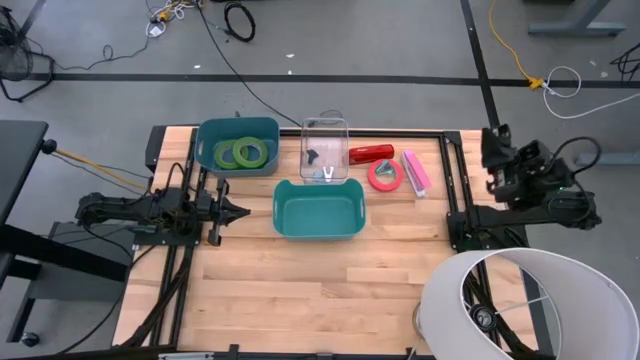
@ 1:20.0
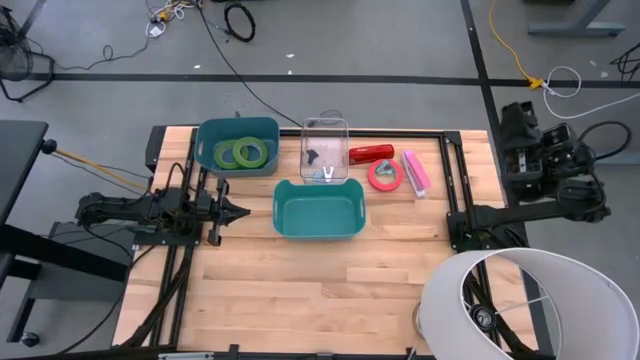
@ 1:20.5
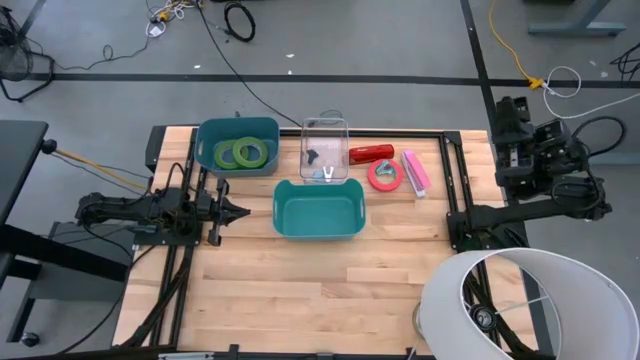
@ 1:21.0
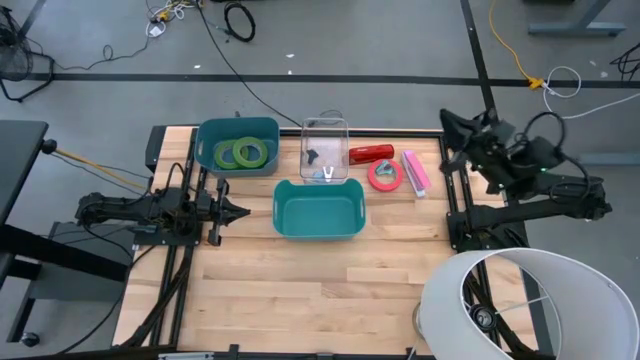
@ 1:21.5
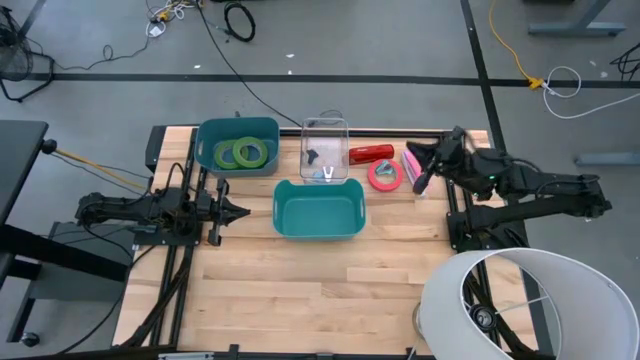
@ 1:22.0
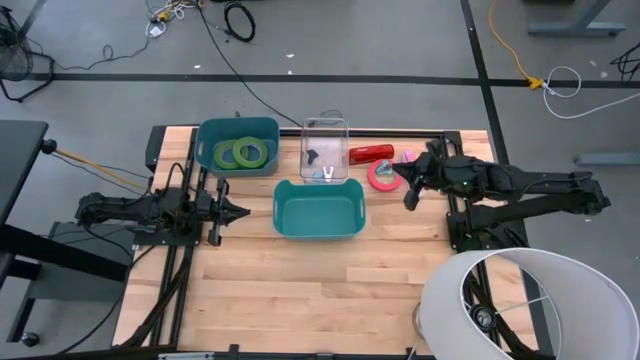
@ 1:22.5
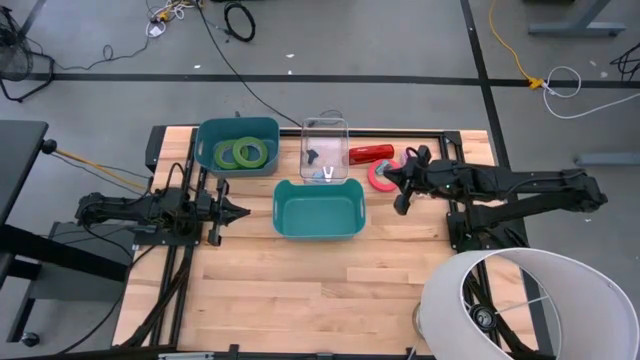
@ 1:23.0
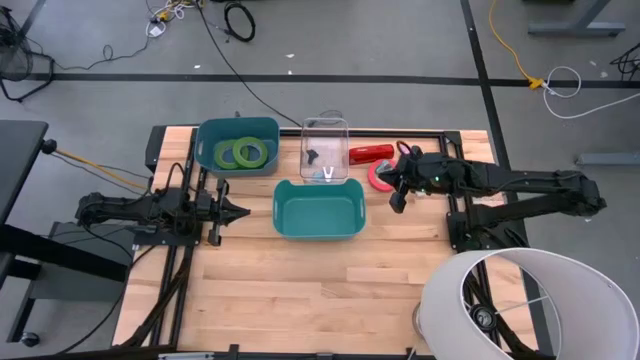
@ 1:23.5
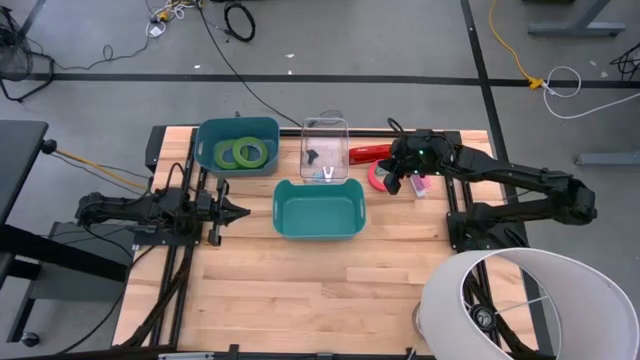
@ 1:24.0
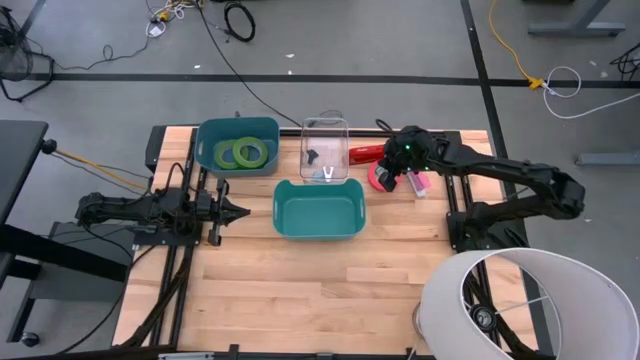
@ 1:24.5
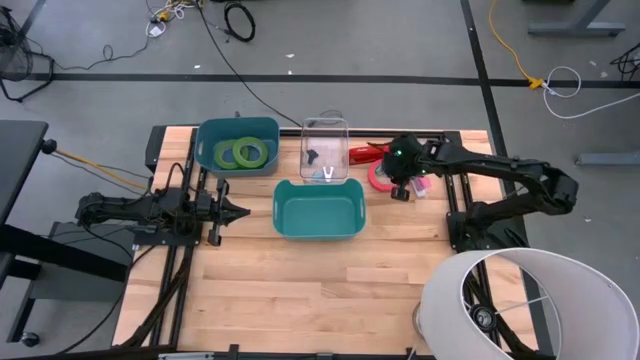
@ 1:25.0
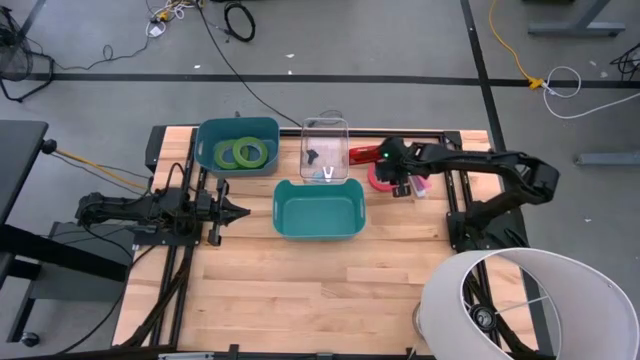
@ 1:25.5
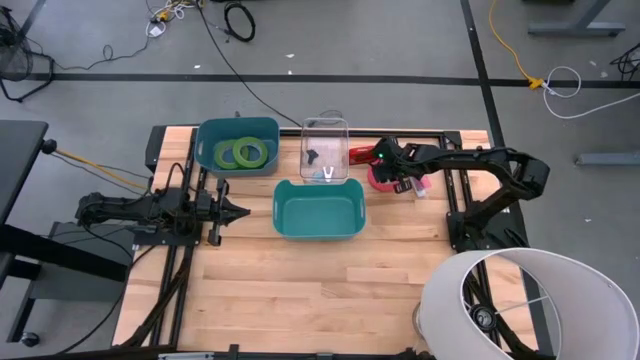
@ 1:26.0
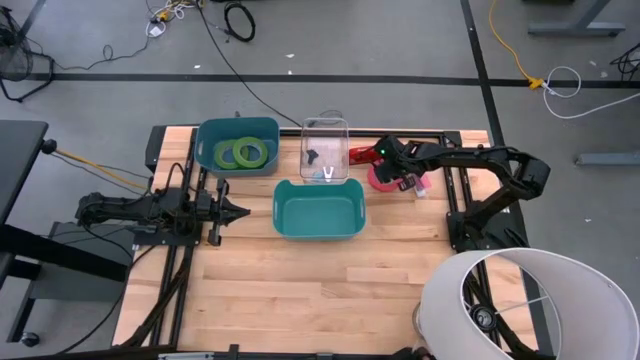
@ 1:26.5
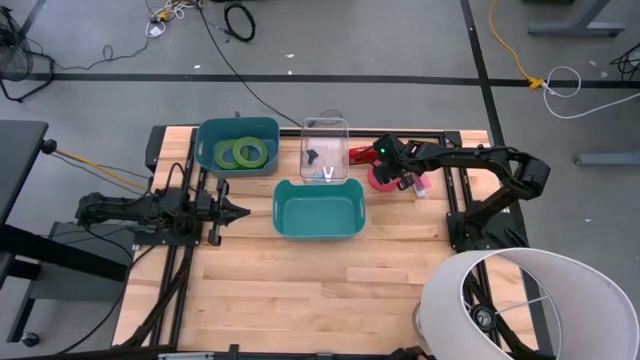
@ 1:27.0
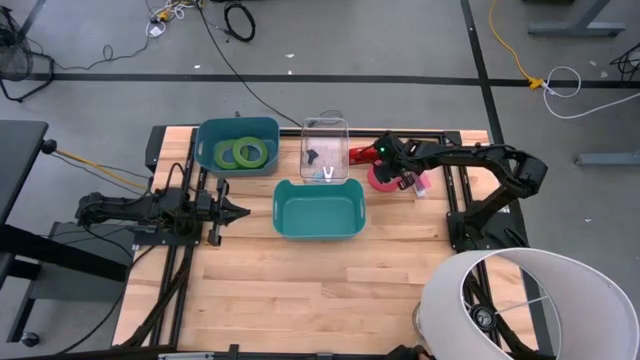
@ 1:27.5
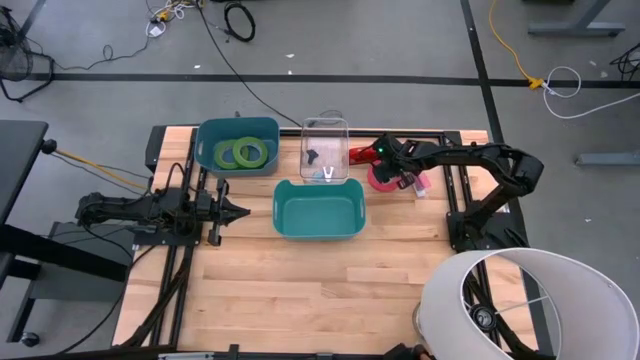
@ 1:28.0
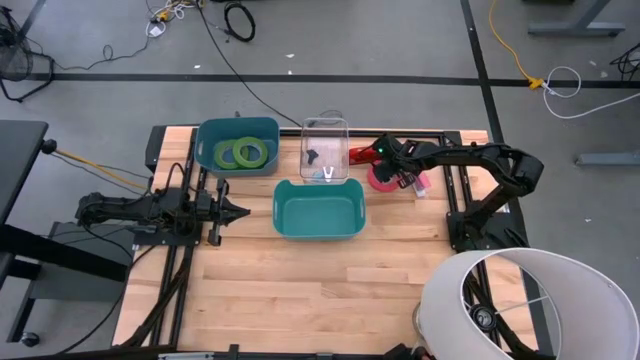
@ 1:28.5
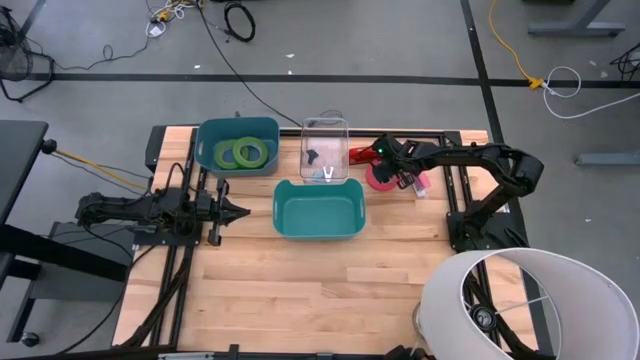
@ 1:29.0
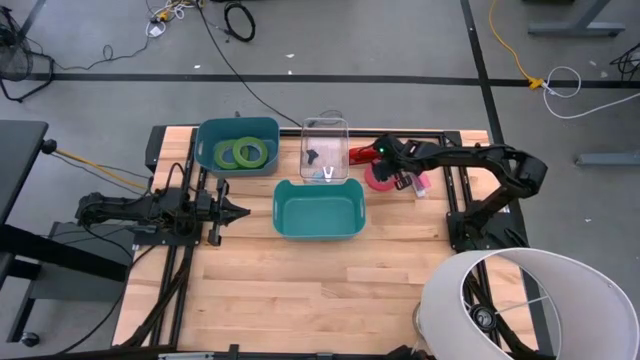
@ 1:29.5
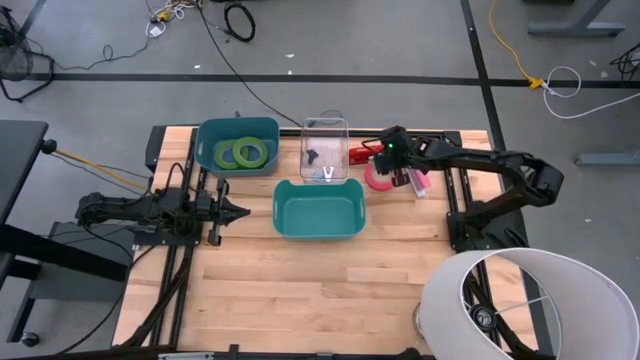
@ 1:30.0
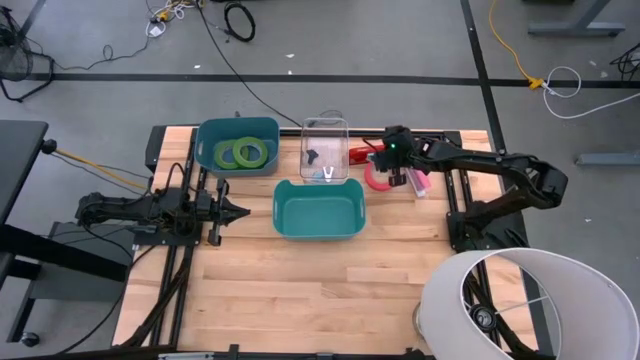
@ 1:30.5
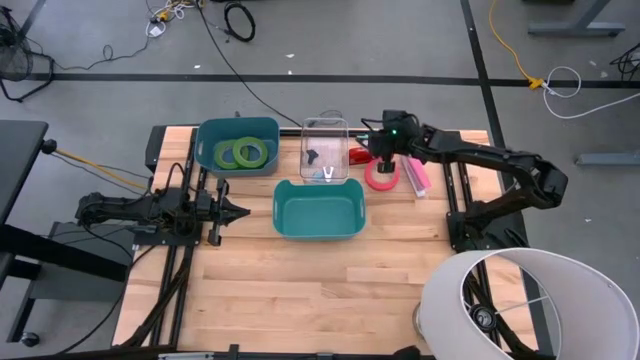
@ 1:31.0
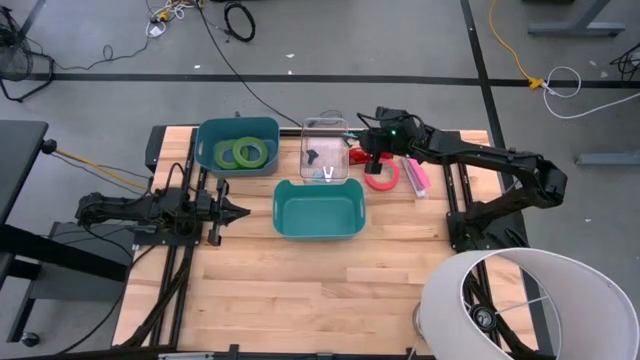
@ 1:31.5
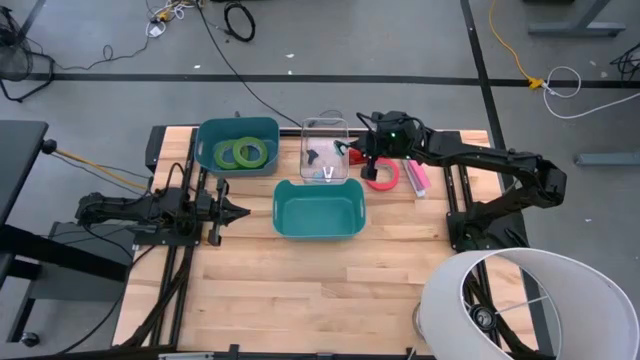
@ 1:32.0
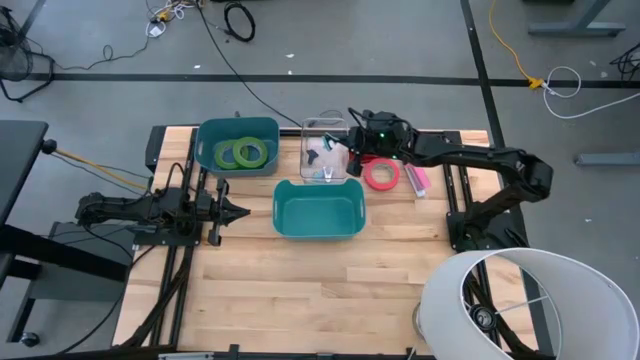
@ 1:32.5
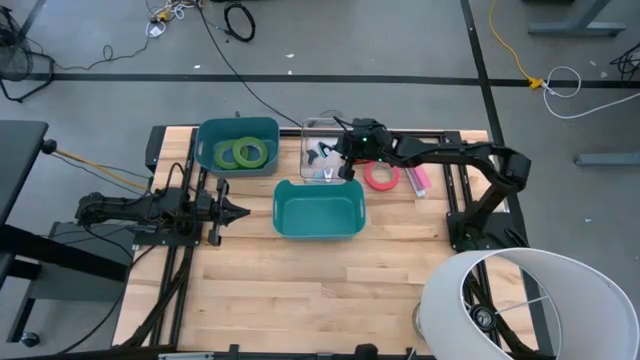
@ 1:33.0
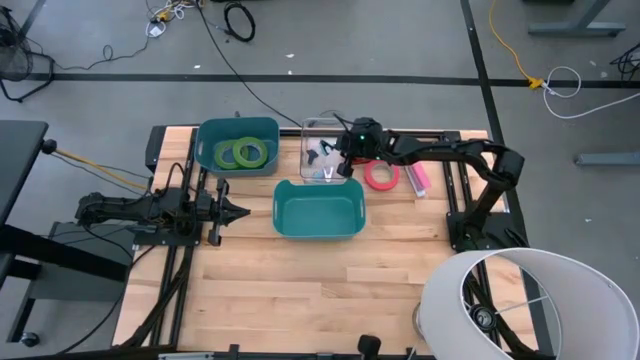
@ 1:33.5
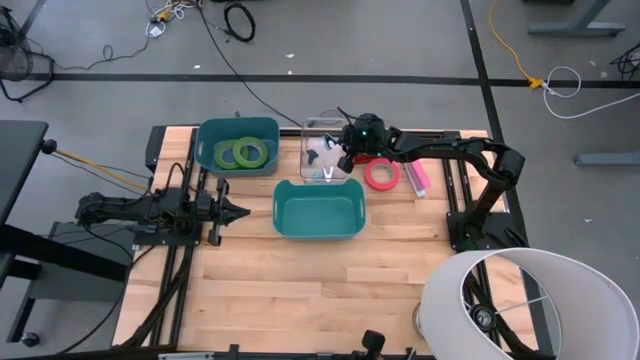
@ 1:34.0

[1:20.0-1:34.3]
Task: Pick and place Stapler, Stapler remover, tape
Put the light blue staple remover into the transparent bin

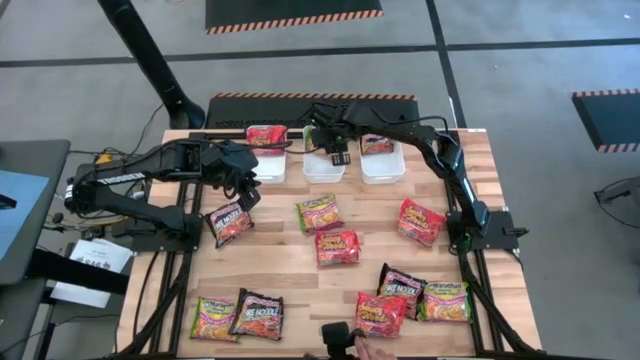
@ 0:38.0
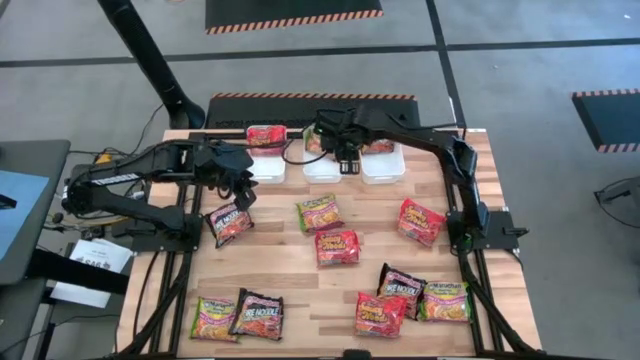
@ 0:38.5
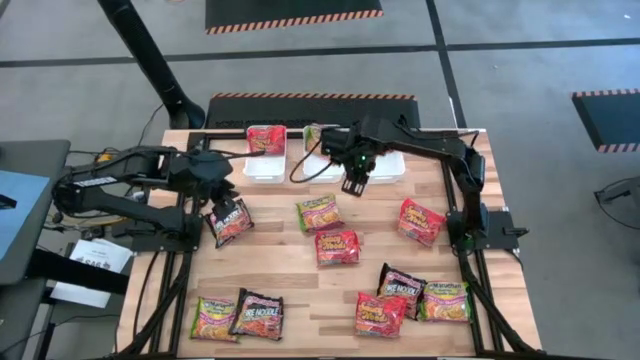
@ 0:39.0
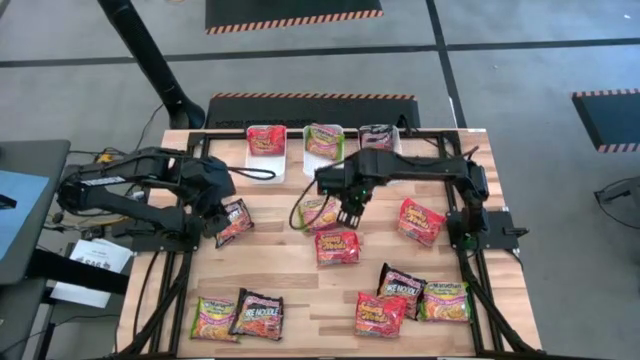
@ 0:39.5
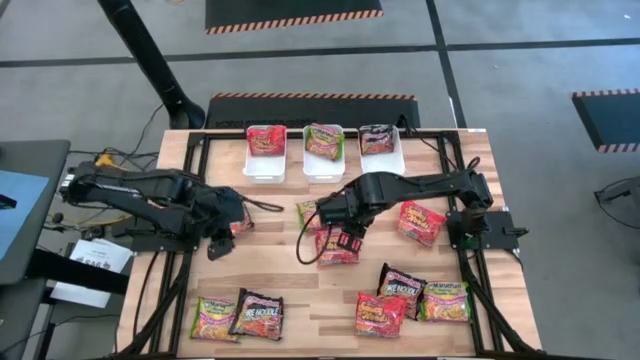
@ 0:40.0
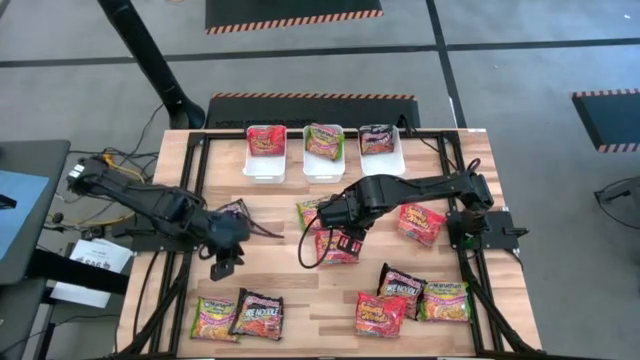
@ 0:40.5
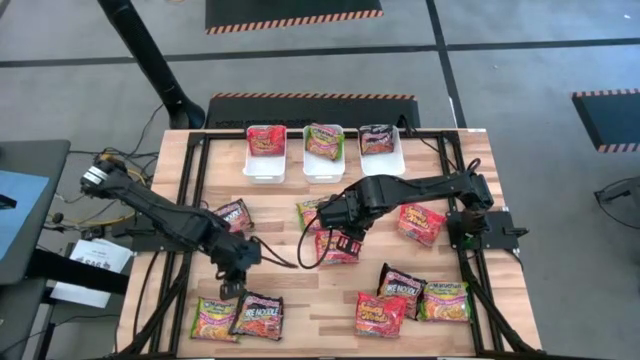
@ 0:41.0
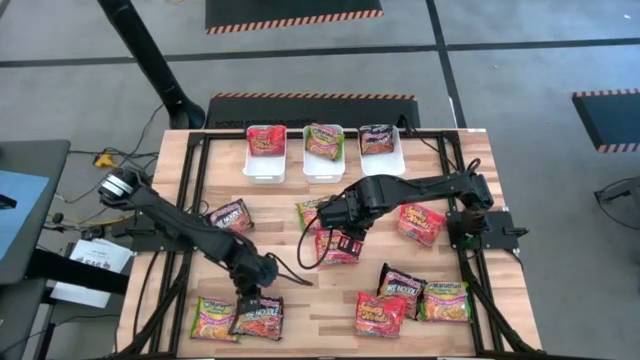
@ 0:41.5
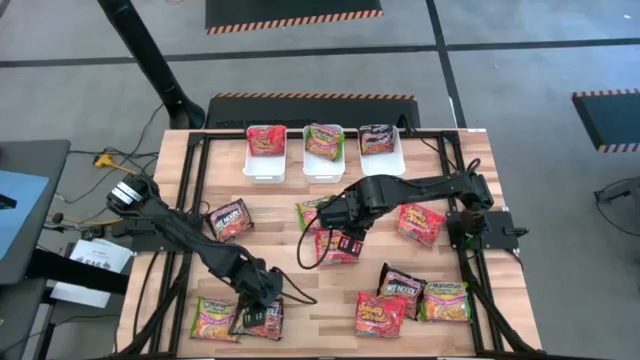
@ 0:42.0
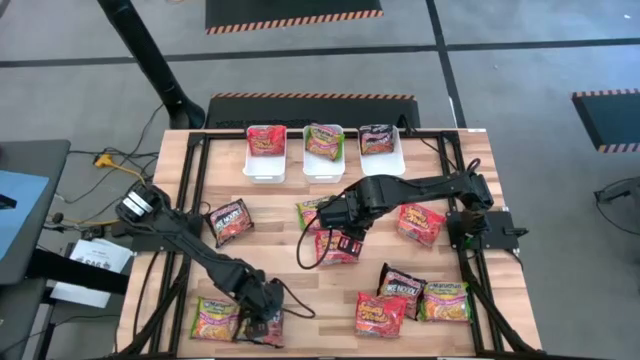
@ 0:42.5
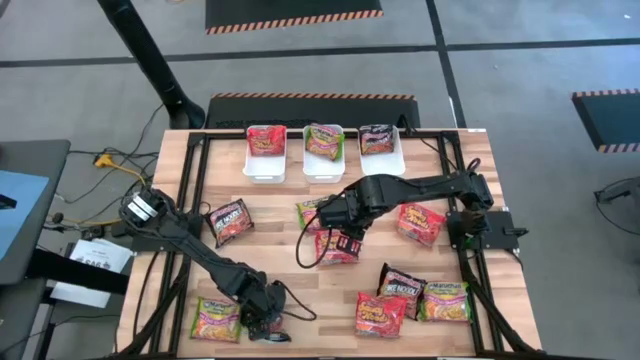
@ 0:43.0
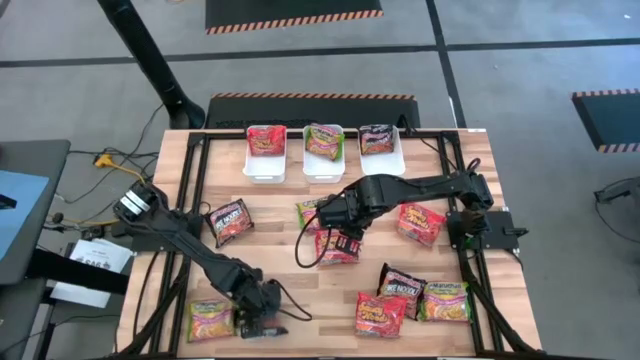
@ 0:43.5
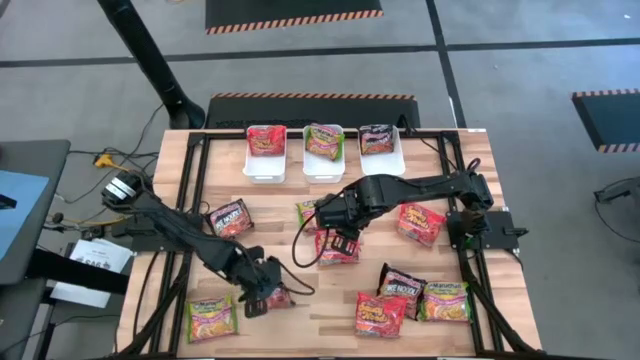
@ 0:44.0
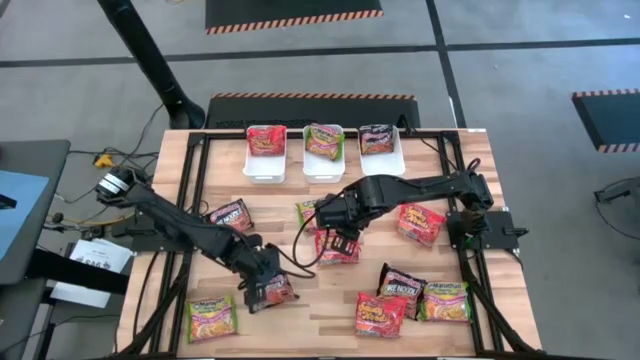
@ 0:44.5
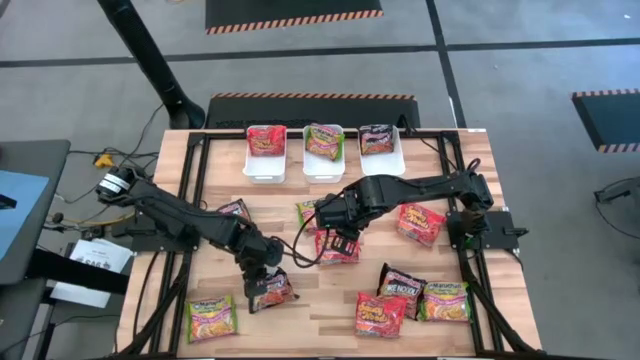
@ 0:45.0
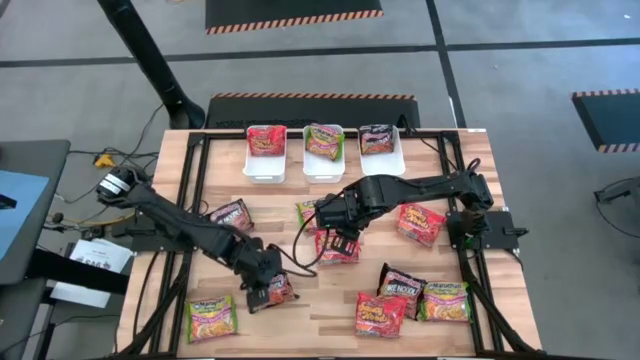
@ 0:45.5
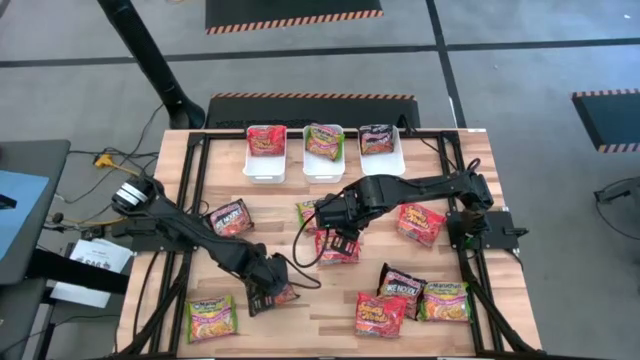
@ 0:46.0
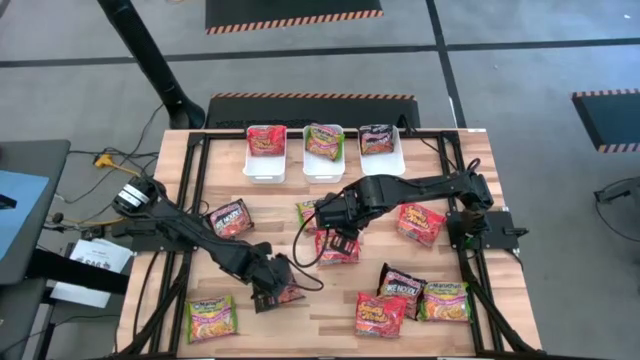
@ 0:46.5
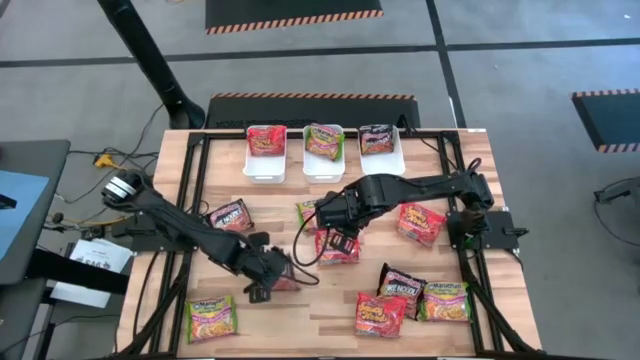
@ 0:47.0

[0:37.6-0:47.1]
Task: Sort Maruchan noodles
Put the bottom left black noodle pack into the right white bin
